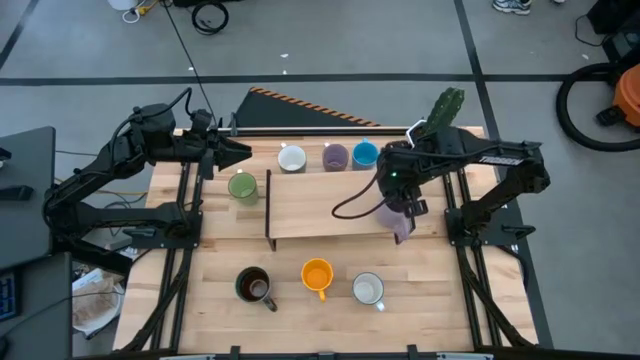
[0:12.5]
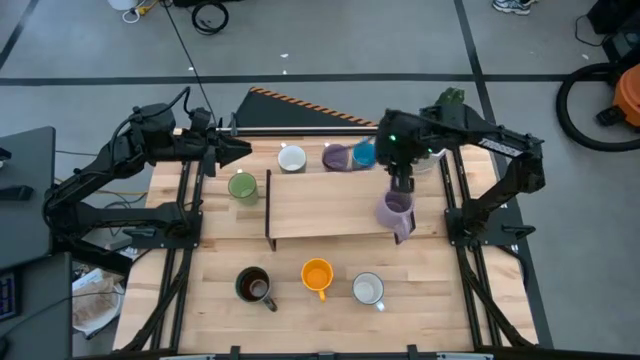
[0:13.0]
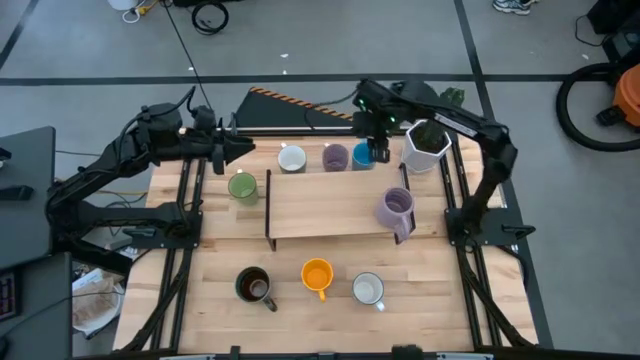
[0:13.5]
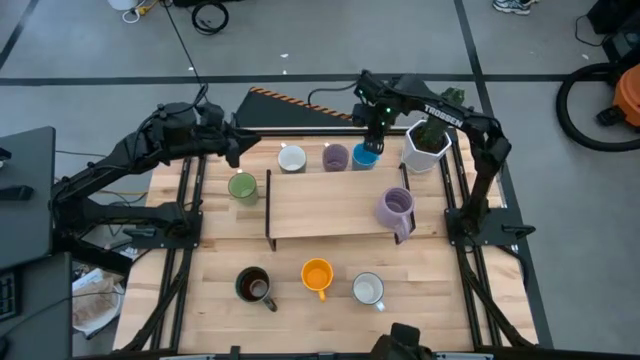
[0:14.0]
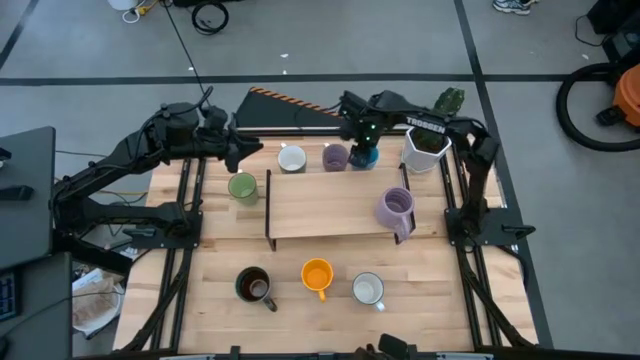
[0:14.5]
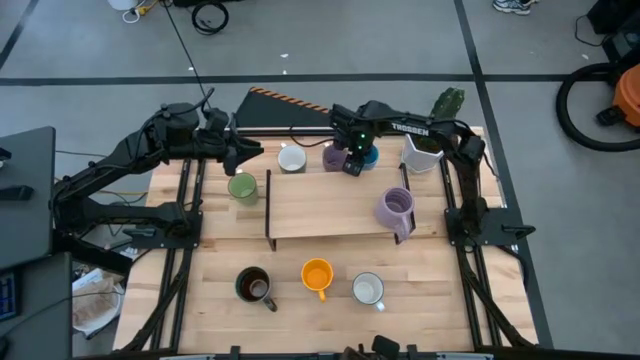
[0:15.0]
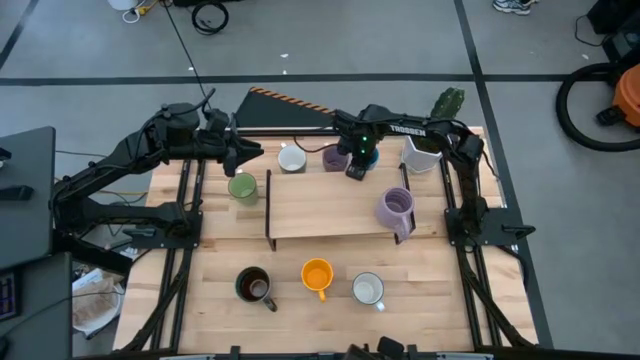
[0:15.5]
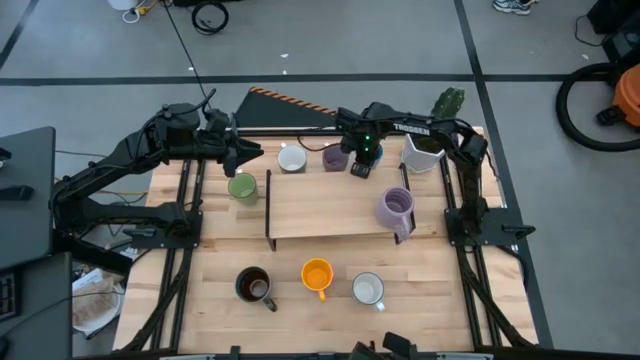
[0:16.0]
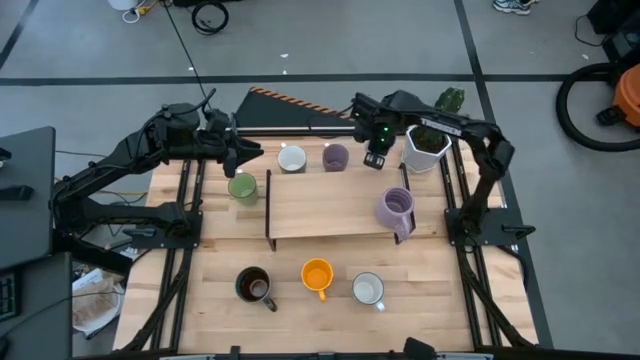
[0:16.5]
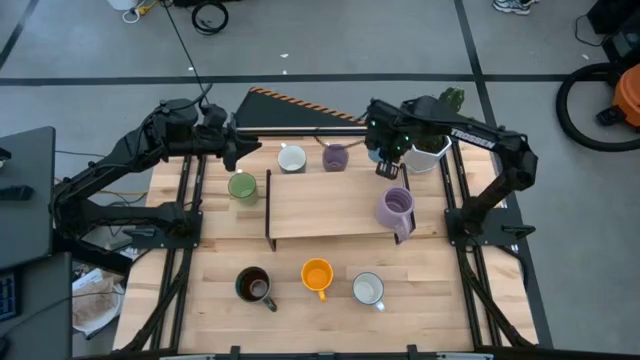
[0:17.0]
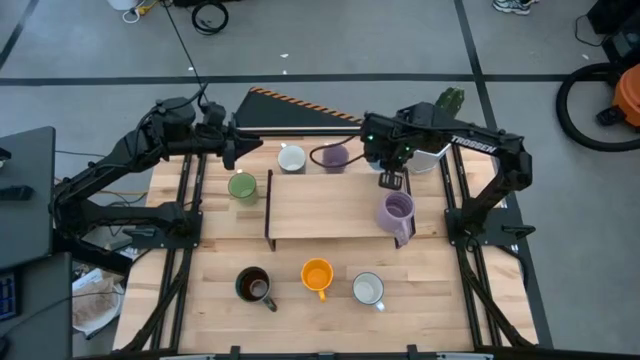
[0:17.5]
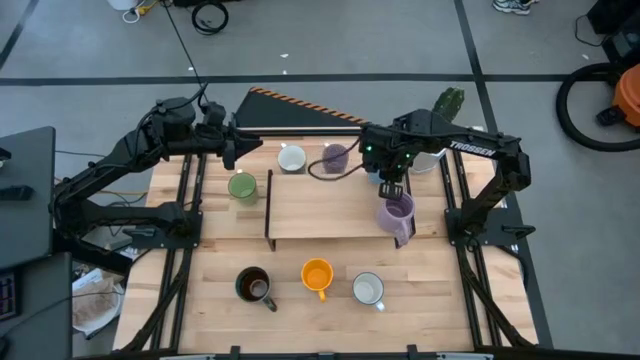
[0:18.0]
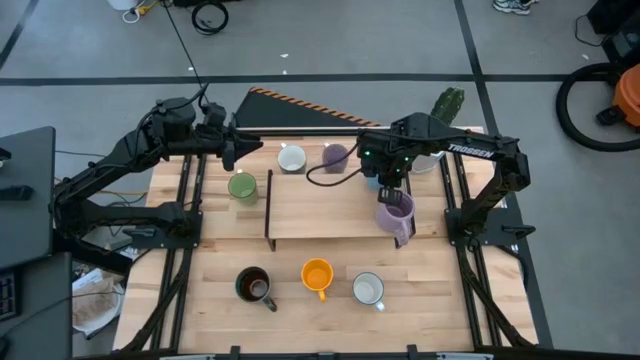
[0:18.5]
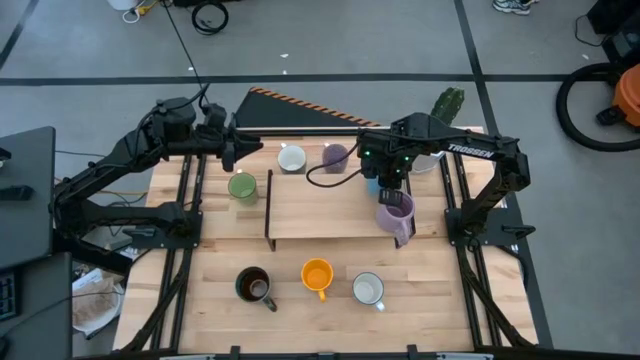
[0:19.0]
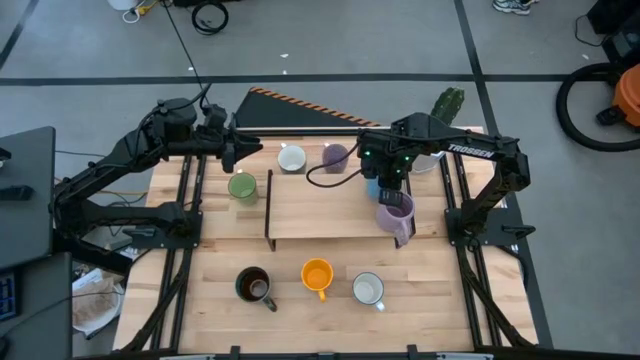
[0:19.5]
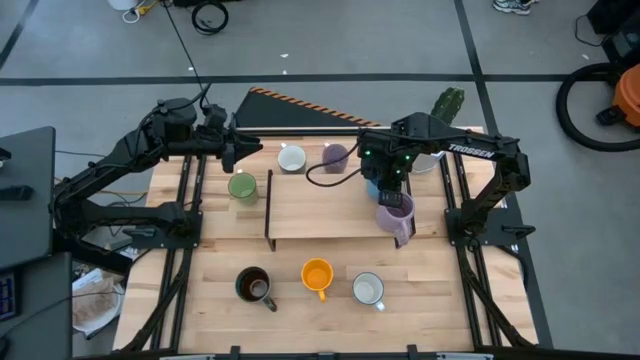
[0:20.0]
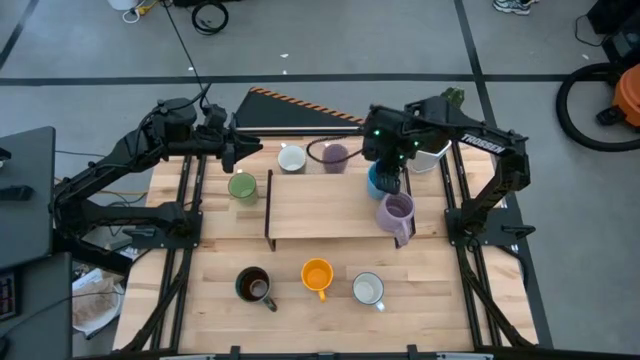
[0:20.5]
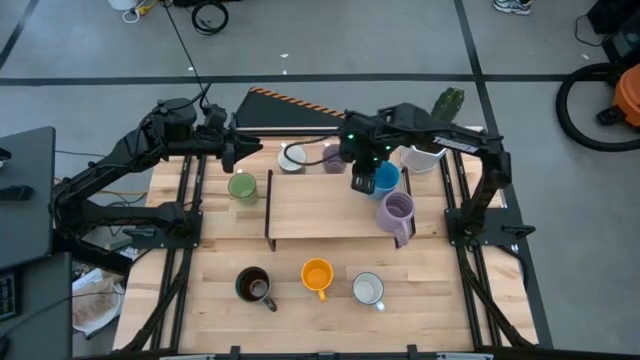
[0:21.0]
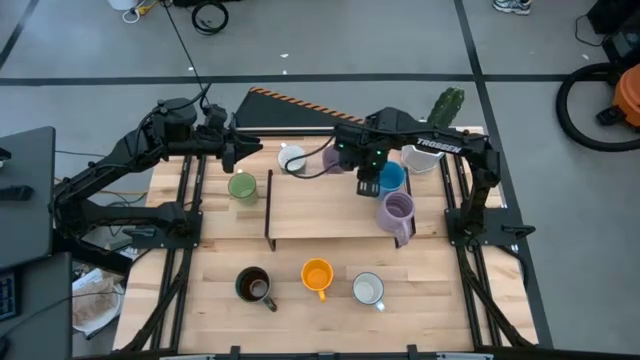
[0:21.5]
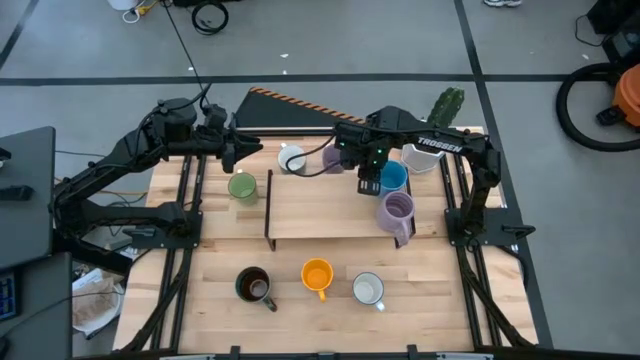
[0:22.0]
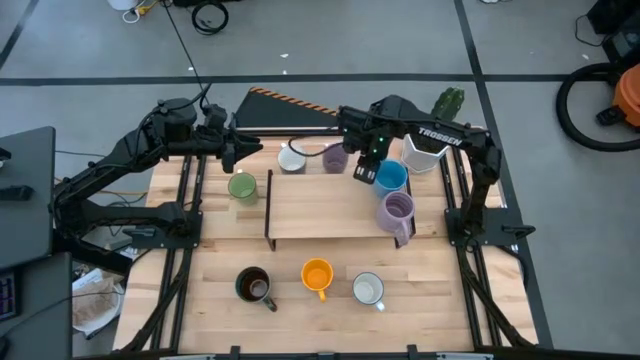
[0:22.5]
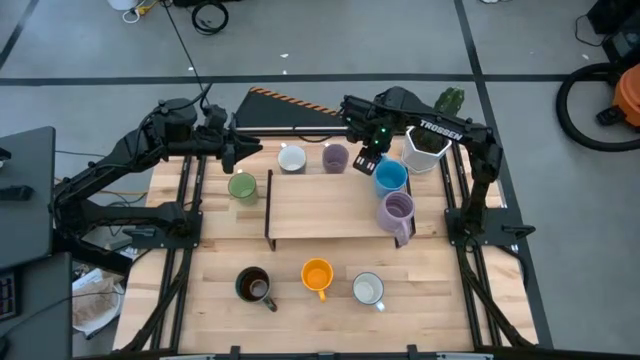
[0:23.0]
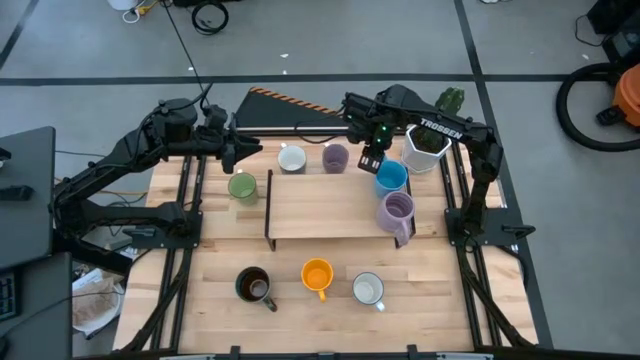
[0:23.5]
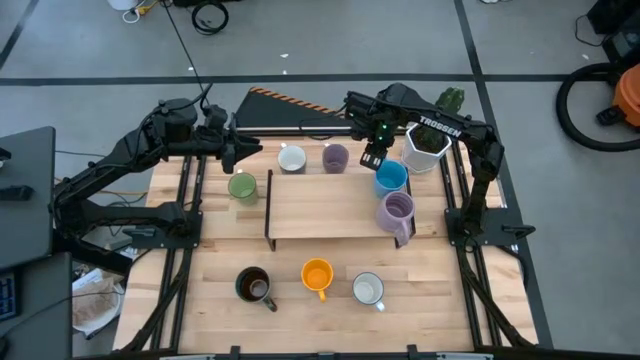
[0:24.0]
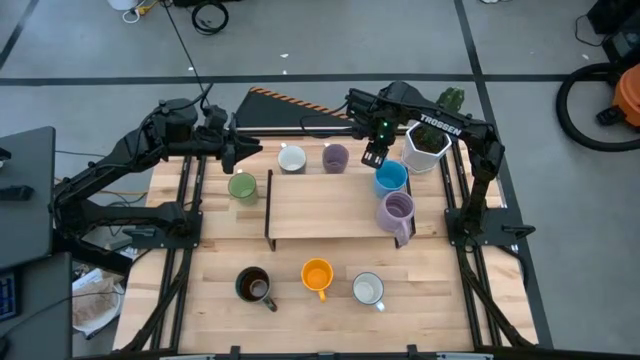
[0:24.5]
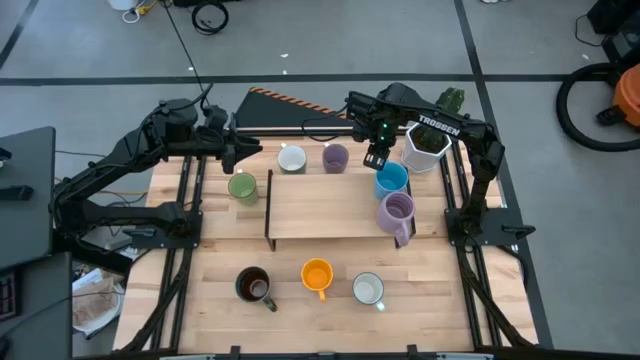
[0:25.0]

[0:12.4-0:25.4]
Task: Place coffee mugs
Put the blue mug on the shelf

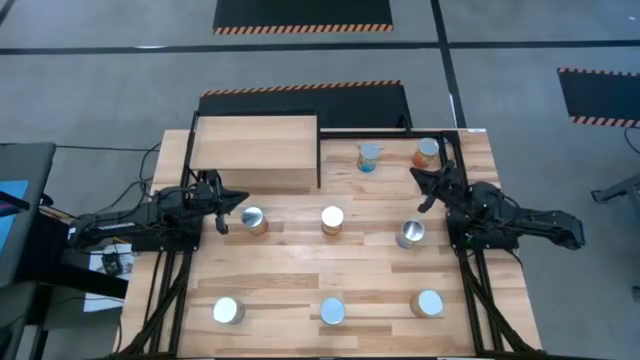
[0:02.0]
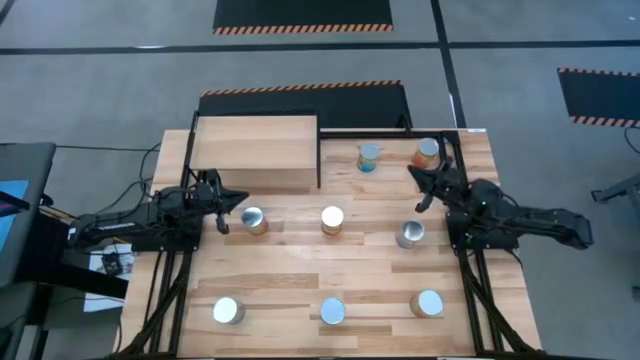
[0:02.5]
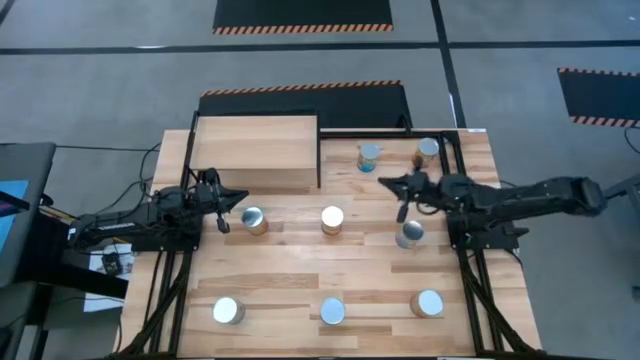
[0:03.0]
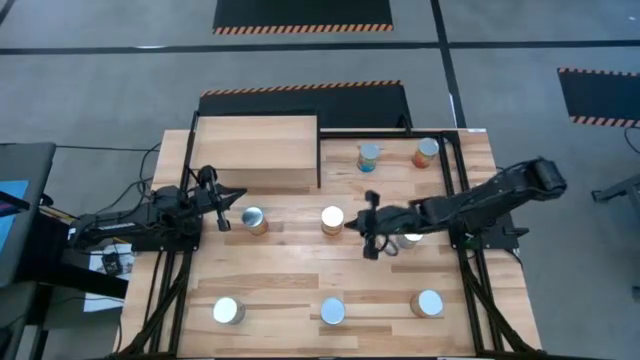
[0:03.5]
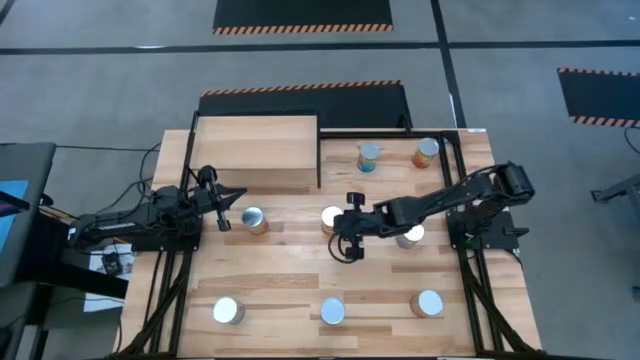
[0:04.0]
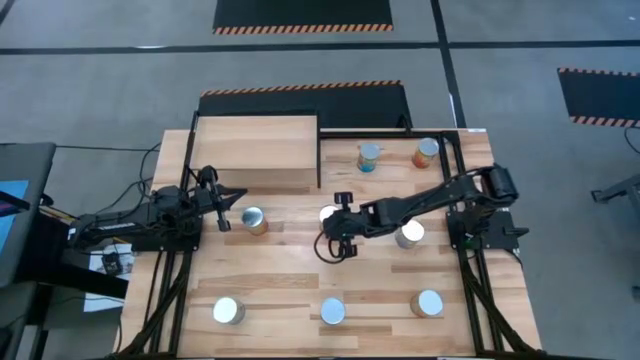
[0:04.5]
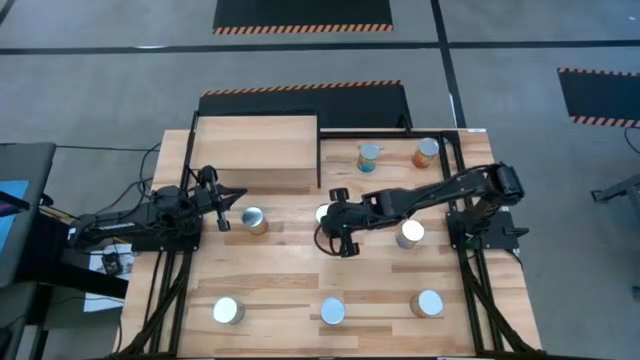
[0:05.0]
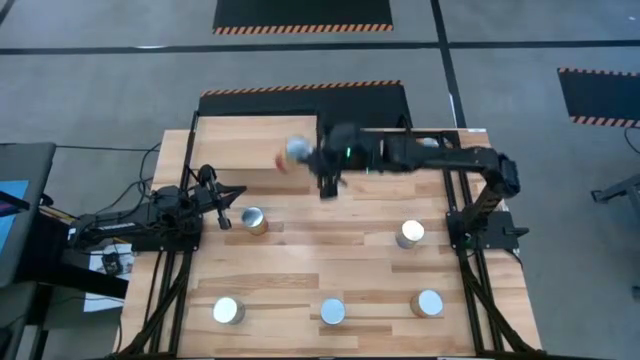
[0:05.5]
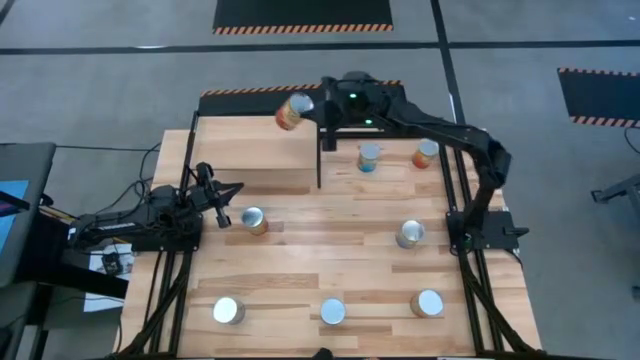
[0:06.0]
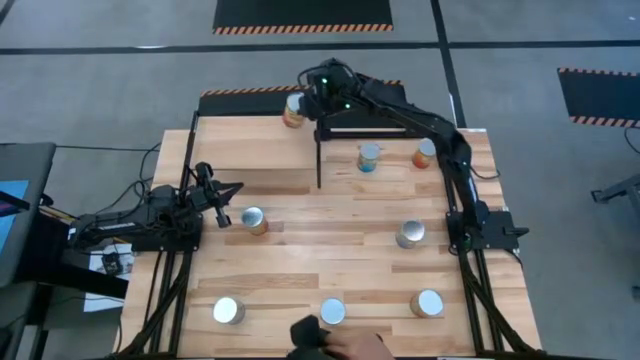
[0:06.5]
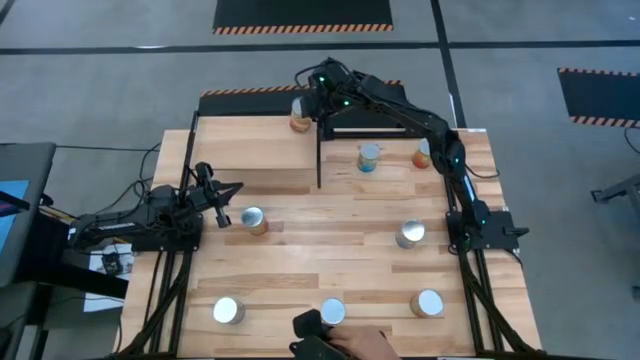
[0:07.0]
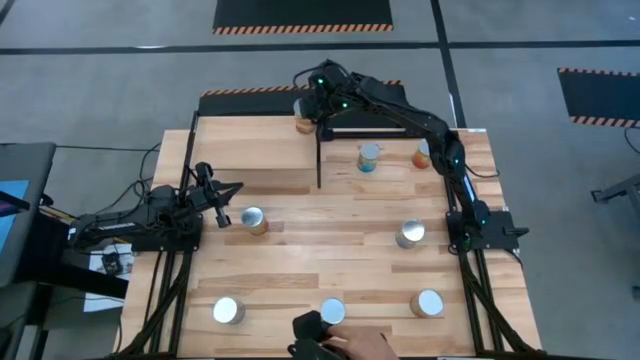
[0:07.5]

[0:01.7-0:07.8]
Task: Pick and place cans onto a shelf
Put the left canned corn on the shelf
